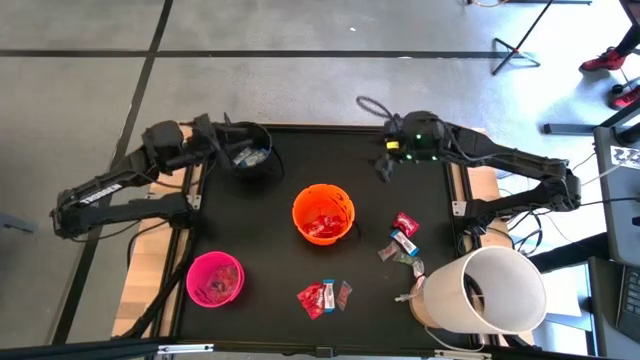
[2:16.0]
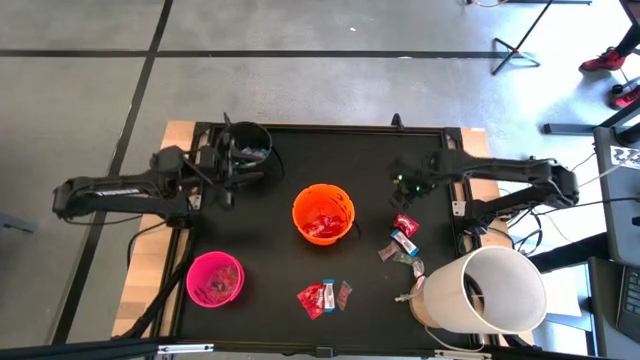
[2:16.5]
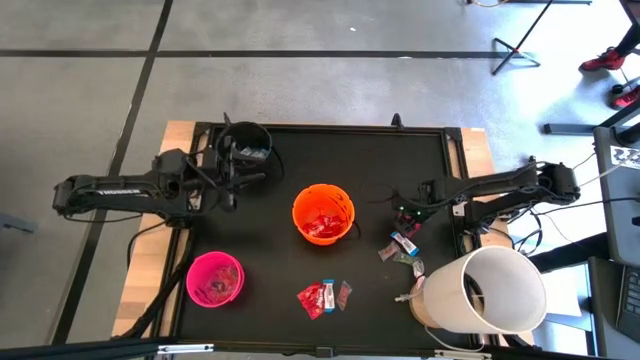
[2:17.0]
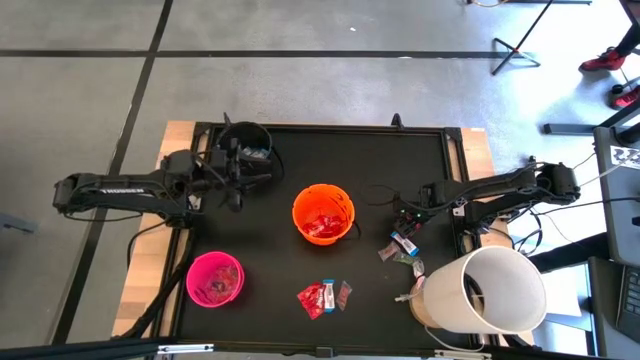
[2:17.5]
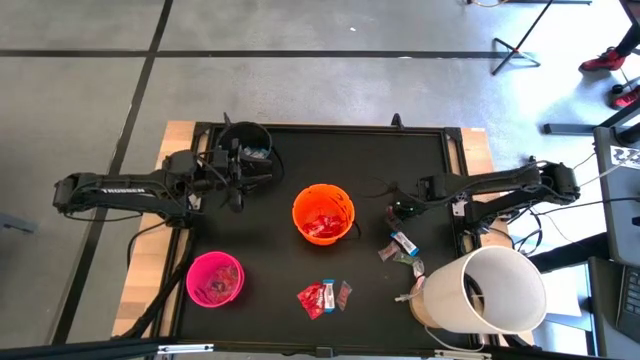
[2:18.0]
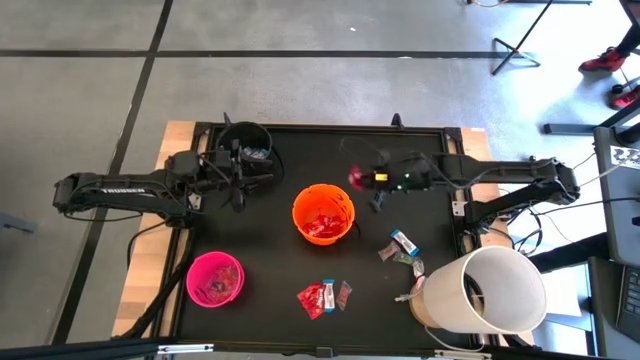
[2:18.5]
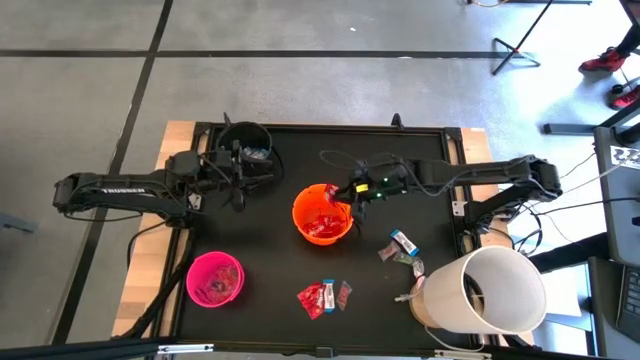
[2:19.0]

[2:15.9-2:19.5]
Task: Sort candy
Put the red candy into the orange bucket

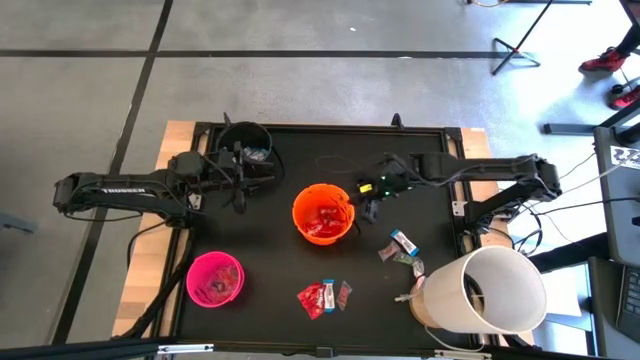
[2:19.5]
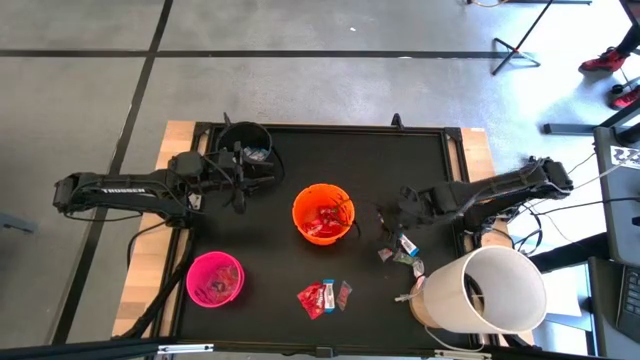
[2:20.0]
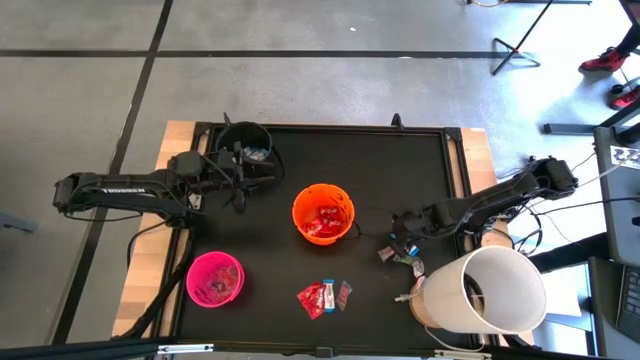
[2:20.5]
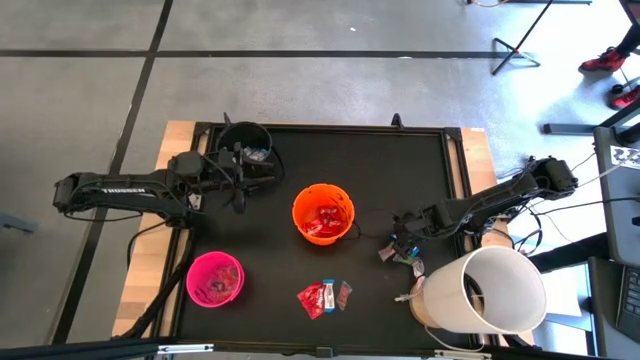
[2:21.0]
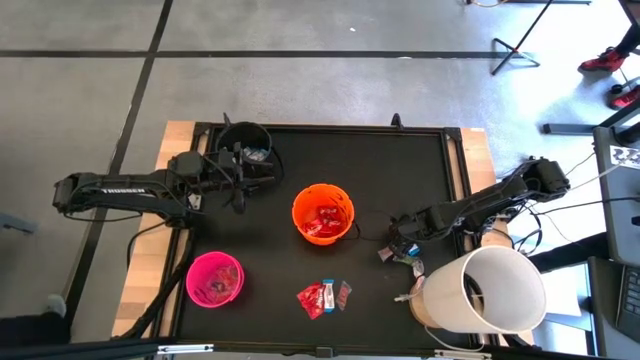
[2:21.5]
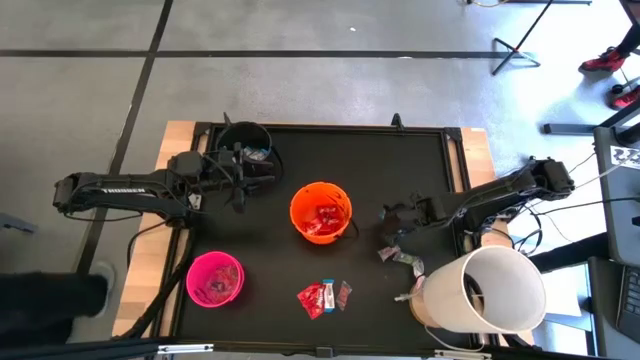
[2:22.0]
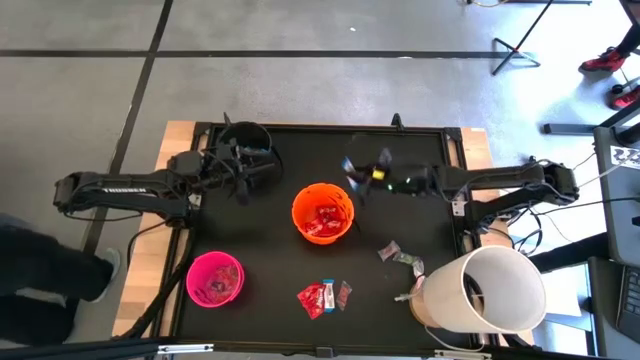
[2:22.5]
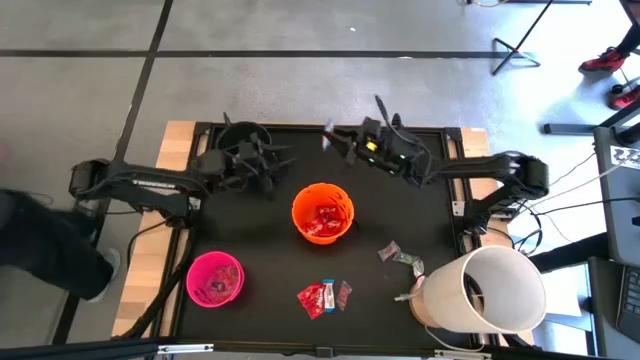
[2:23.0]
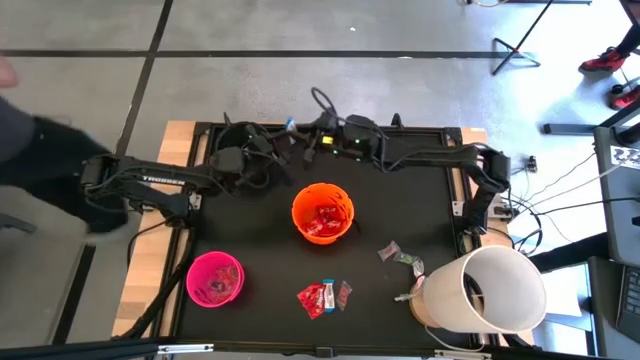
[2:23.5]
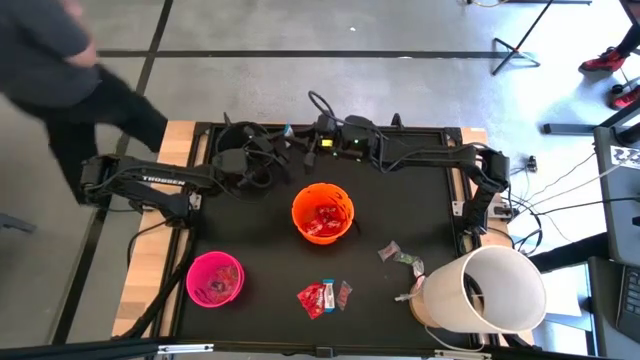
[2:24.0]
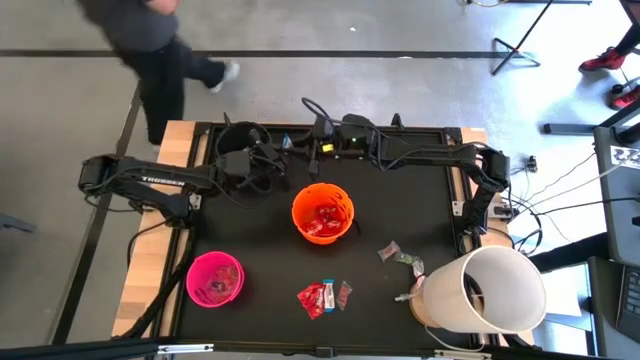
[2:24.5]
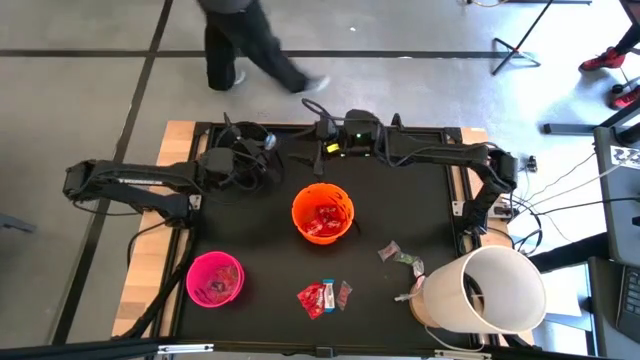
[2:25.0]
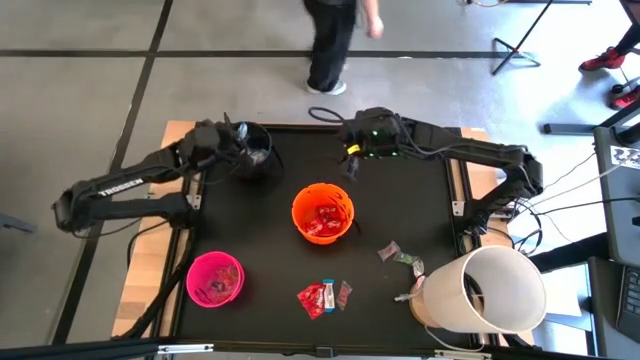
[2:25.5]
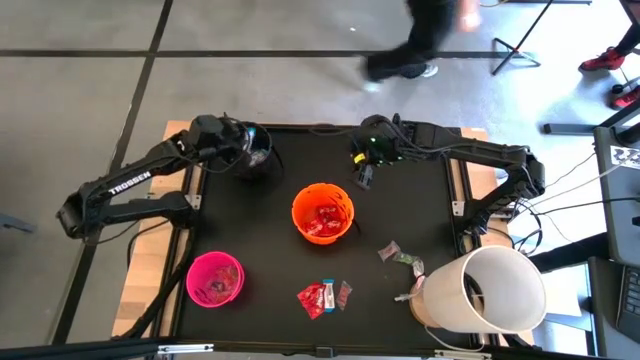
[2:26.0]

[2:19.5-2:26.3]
Put the white chocolate into the black bucket

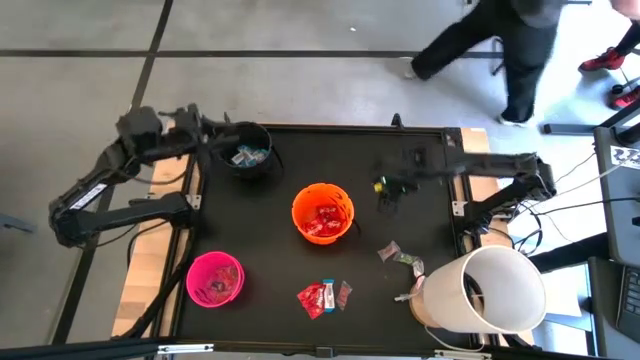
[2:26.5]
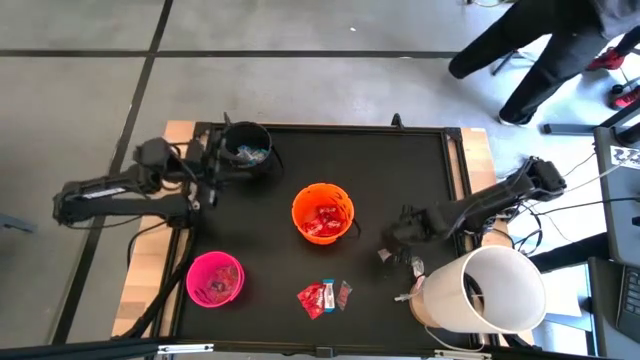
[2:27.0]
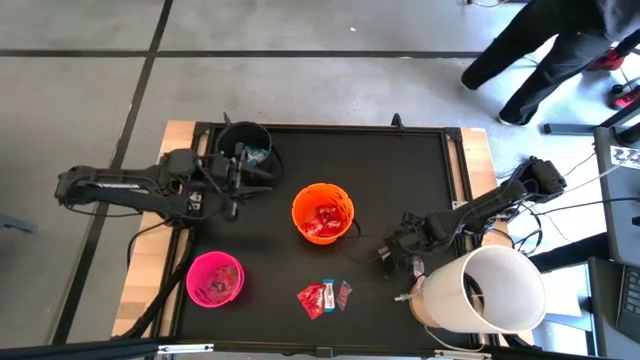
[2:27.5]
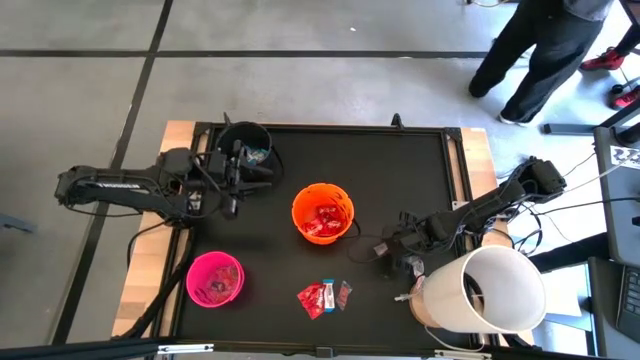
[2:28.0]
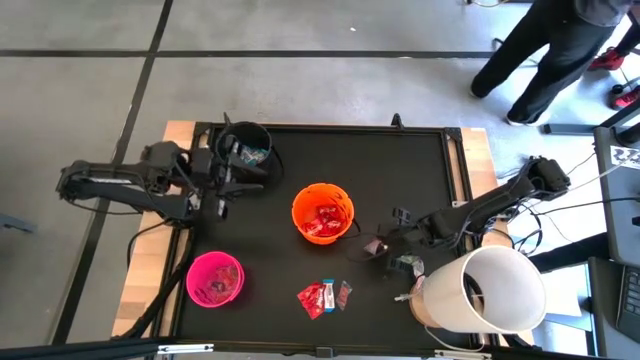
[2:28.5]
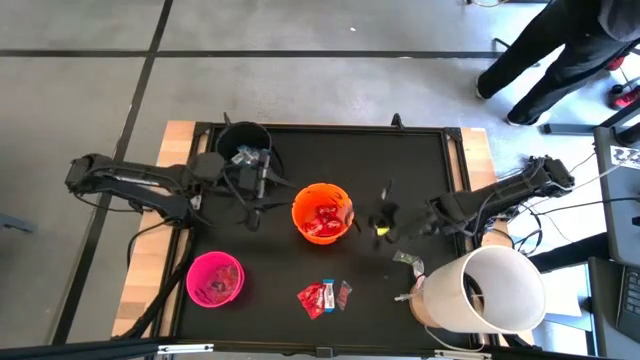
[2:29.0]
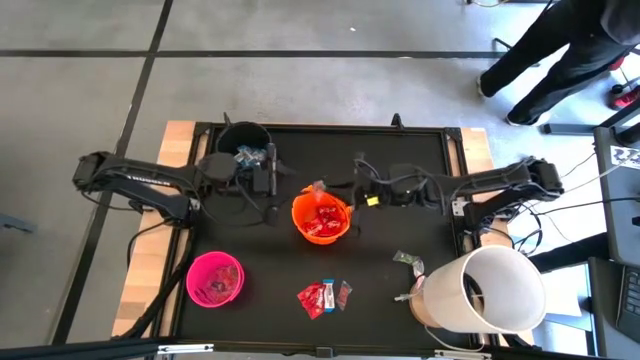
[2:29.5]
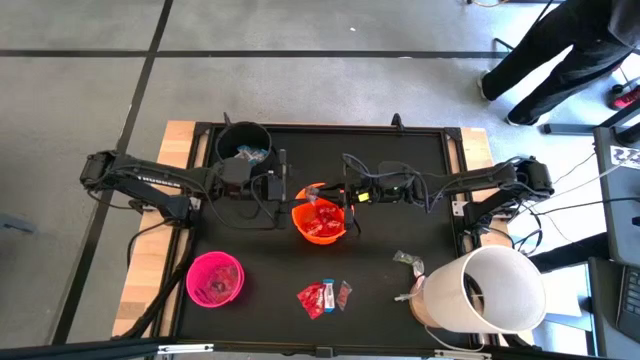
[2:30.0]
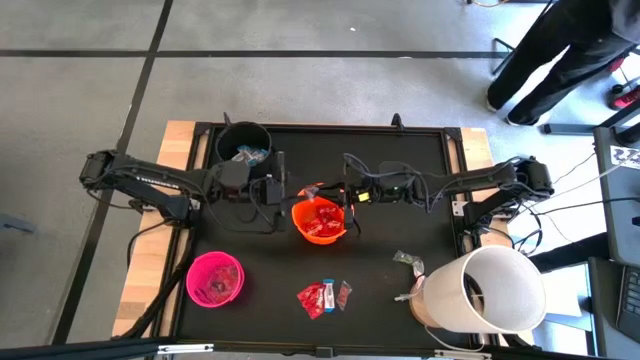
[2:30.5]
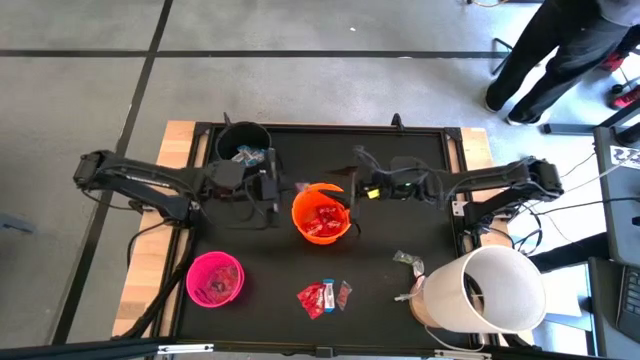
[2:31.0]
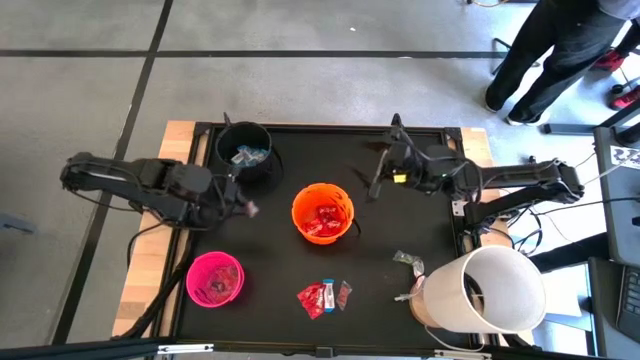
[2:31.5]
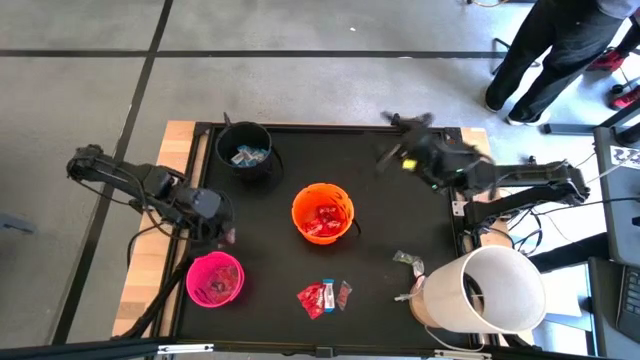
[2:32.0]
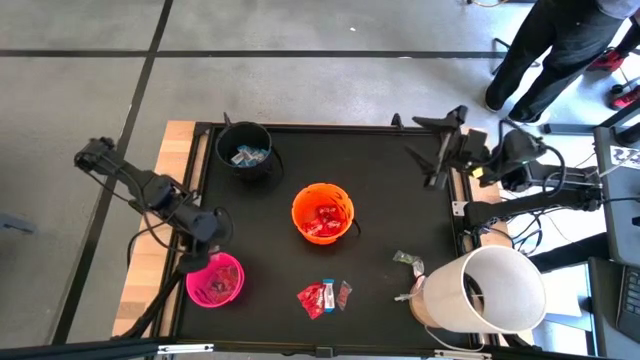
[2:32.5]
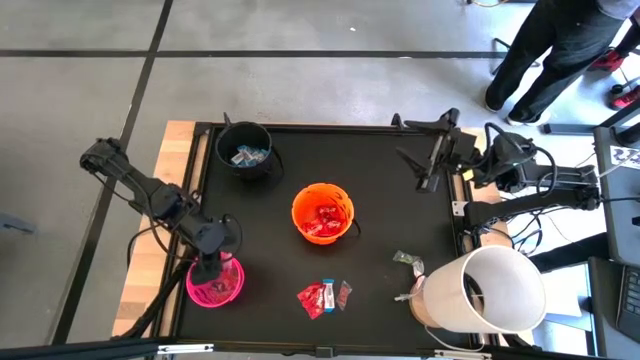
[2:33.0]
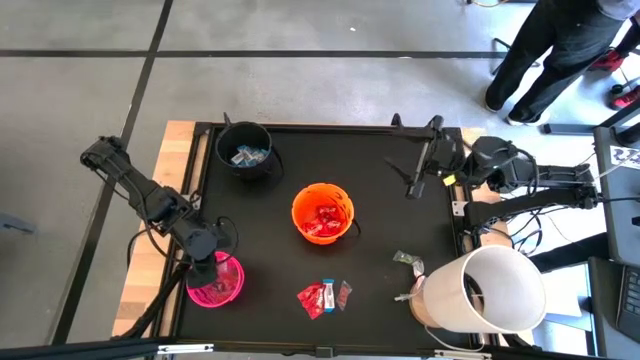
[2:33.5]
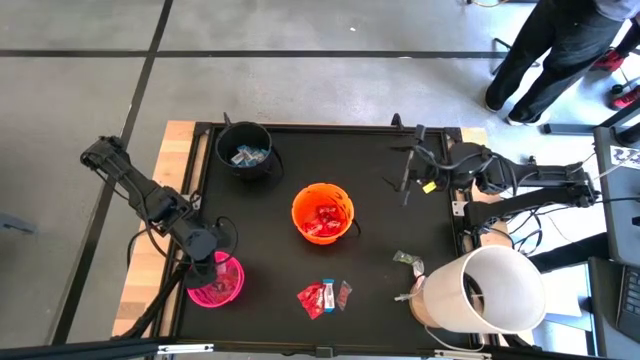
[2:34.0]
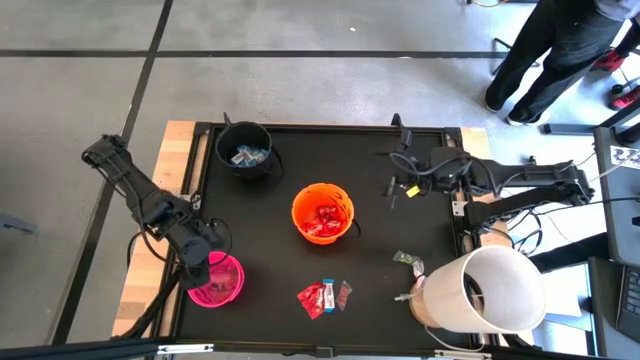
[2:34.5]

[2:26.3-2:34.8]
Put the transparent candy into the pink bucket

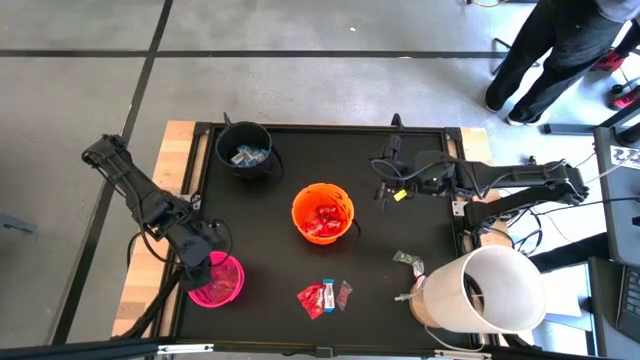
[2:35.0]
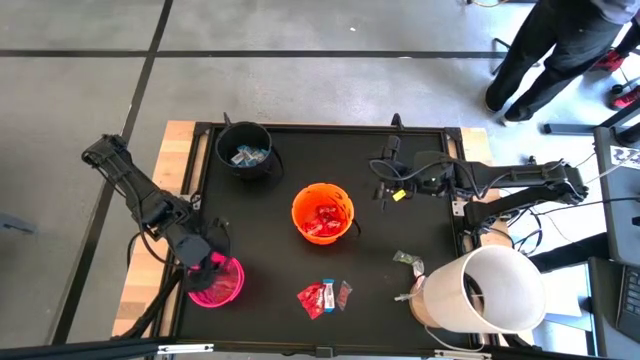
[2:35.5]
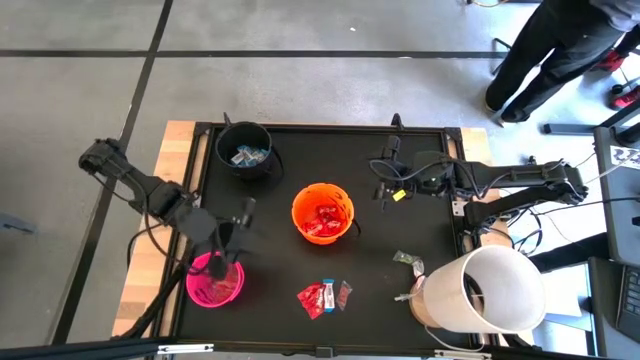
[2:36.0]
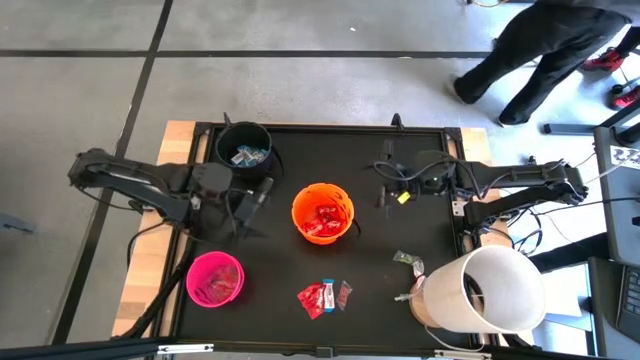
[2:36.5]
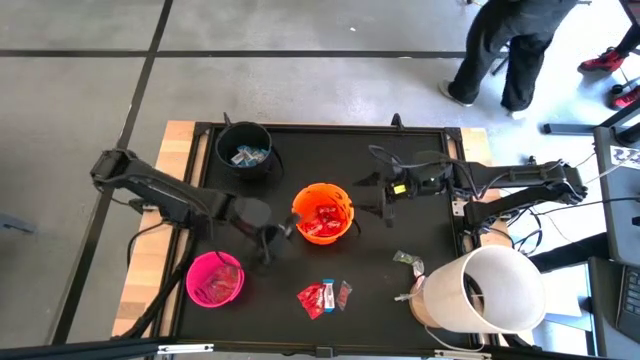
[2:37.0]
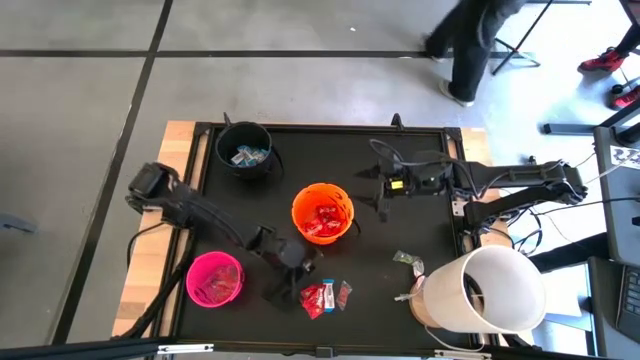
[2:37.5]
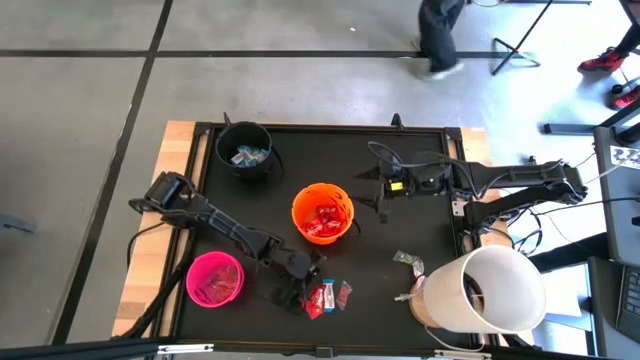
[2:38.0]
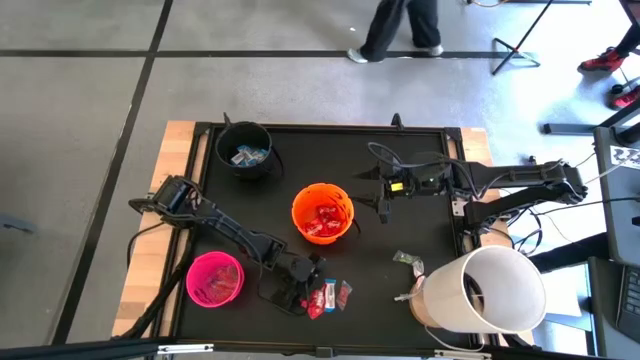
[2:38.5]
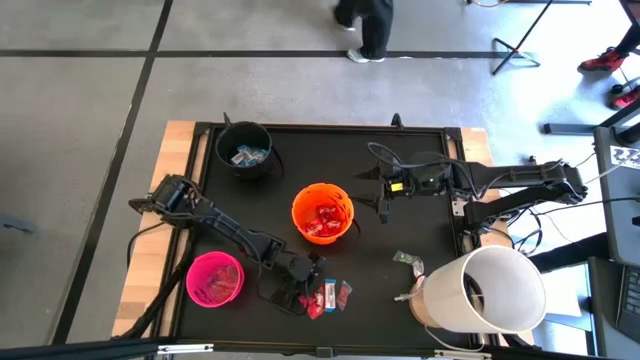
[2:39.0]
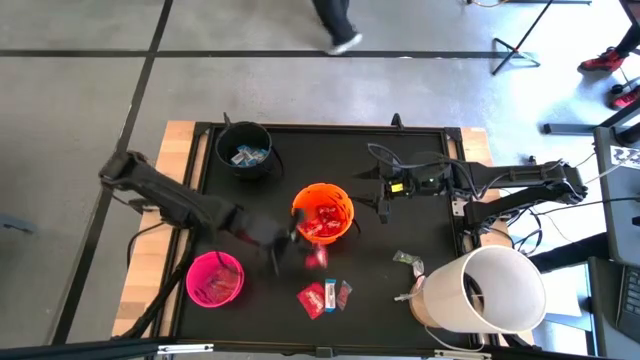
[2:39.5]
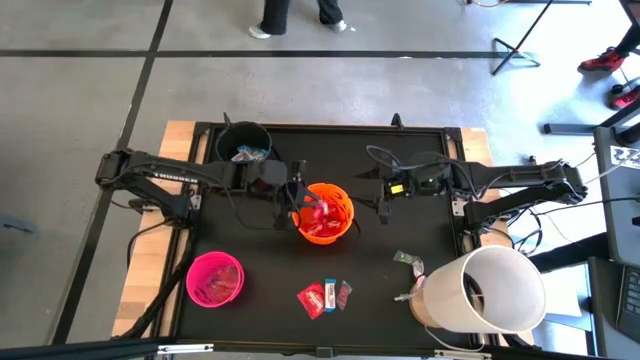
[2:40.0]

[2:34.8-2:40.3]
Put the red candy into the orange bucket
